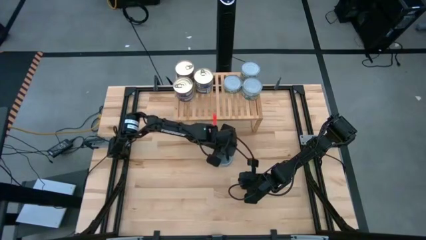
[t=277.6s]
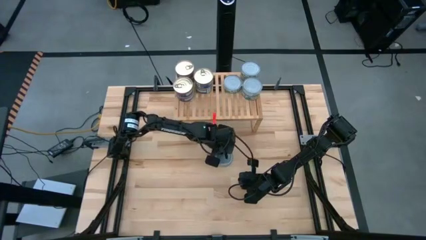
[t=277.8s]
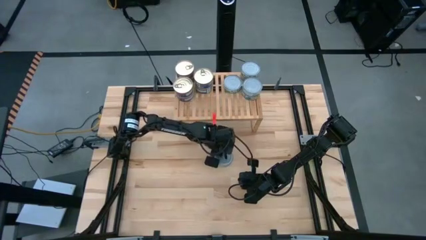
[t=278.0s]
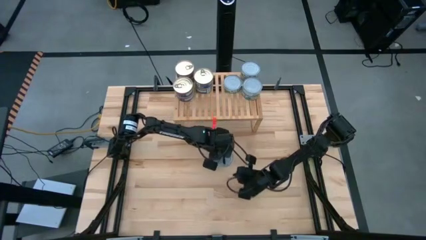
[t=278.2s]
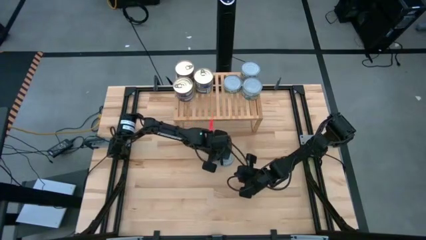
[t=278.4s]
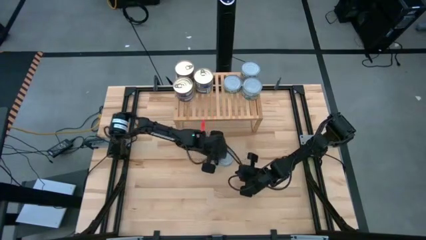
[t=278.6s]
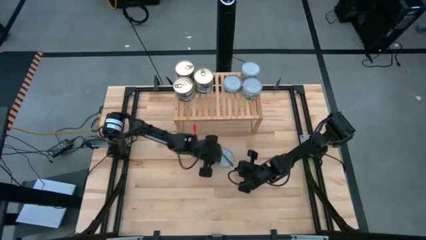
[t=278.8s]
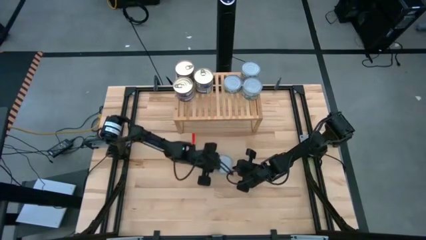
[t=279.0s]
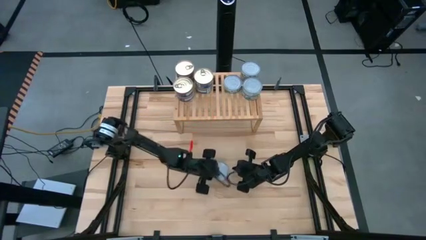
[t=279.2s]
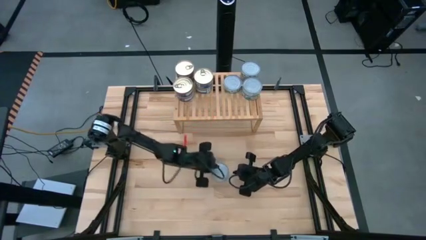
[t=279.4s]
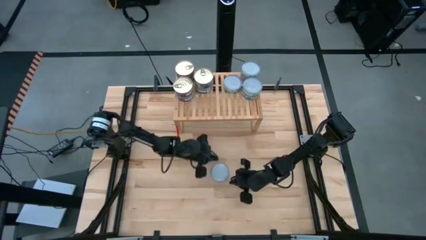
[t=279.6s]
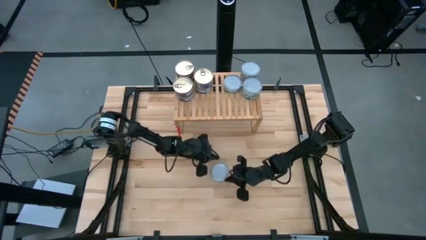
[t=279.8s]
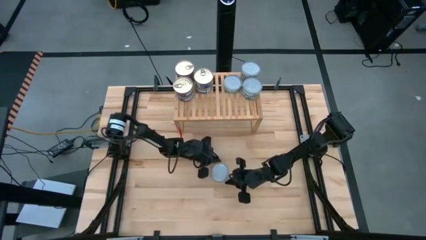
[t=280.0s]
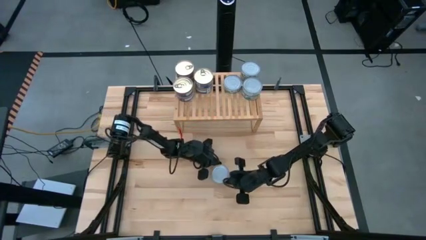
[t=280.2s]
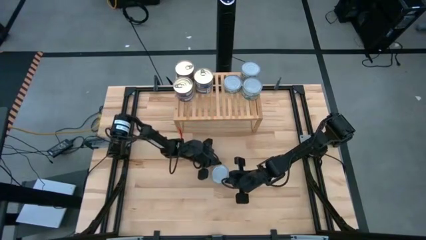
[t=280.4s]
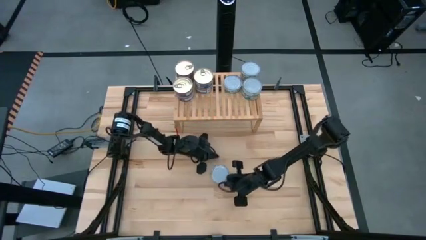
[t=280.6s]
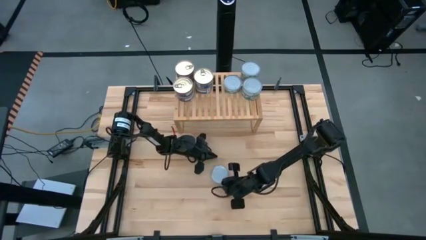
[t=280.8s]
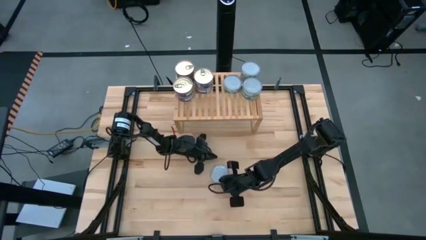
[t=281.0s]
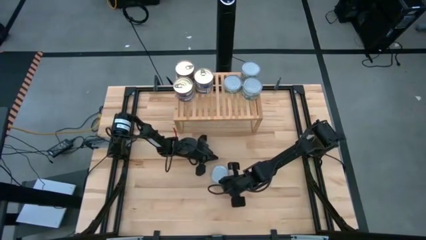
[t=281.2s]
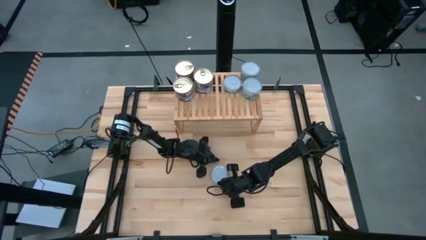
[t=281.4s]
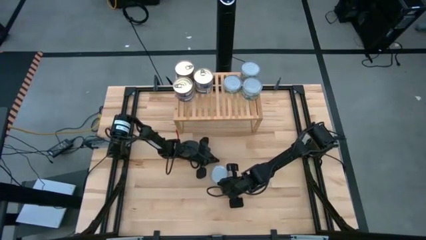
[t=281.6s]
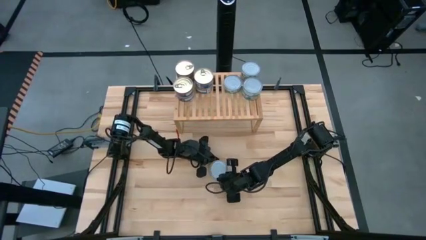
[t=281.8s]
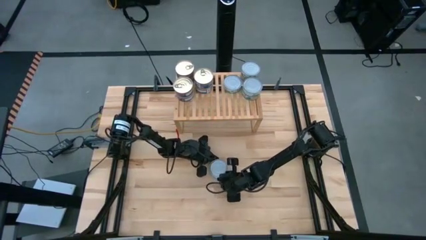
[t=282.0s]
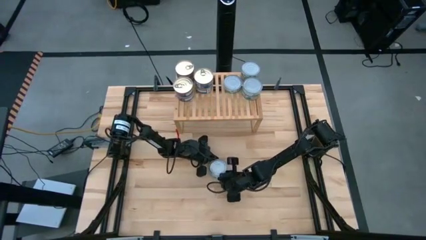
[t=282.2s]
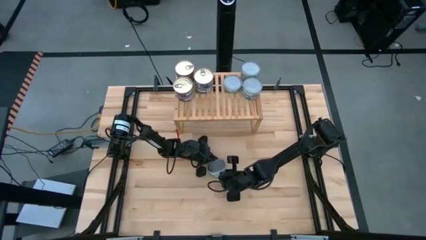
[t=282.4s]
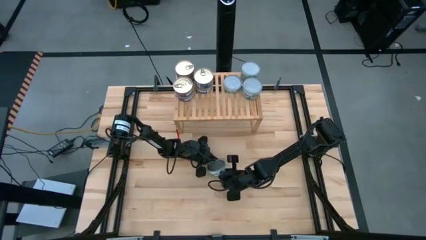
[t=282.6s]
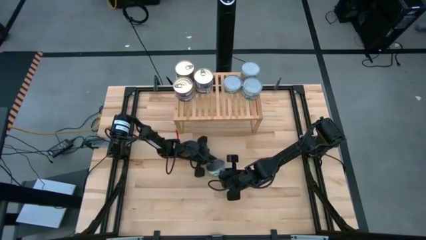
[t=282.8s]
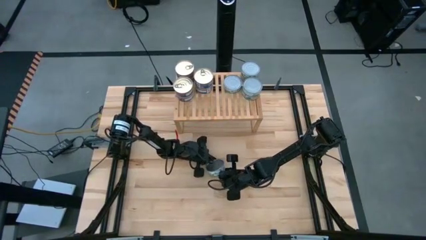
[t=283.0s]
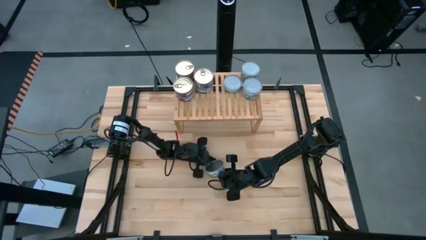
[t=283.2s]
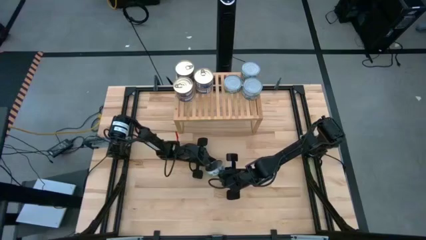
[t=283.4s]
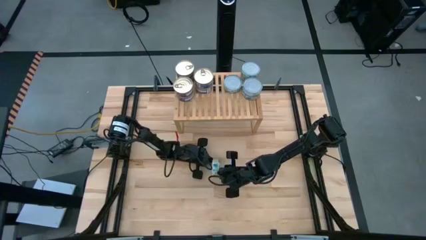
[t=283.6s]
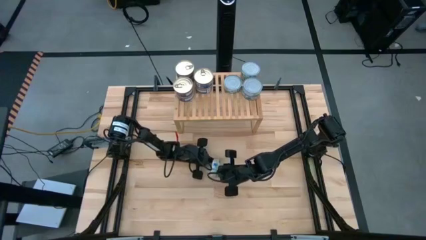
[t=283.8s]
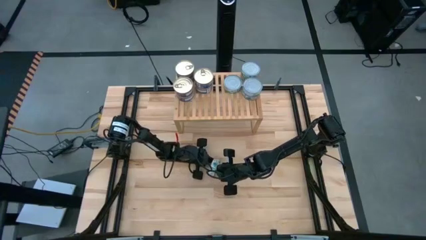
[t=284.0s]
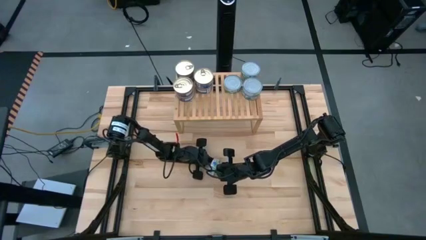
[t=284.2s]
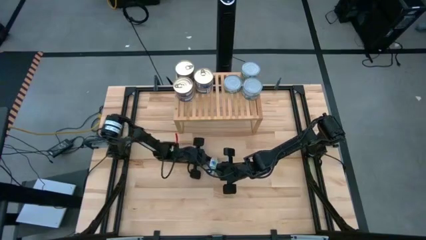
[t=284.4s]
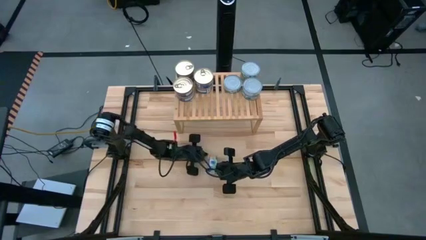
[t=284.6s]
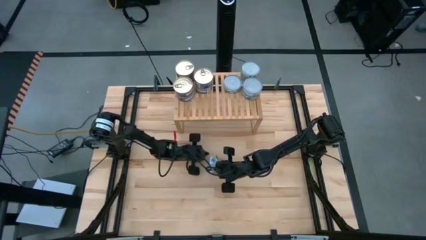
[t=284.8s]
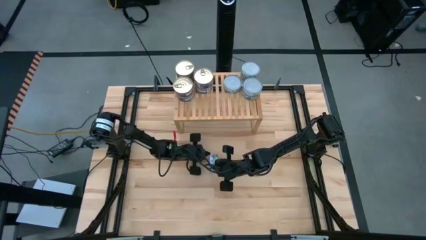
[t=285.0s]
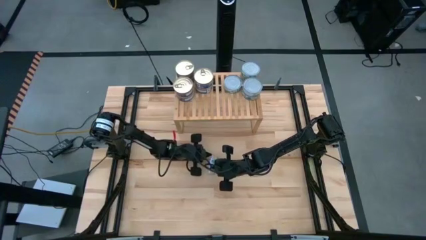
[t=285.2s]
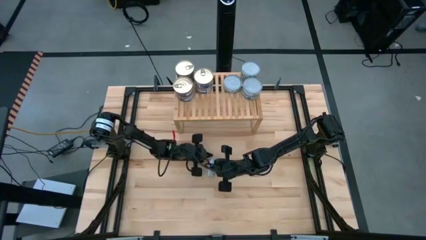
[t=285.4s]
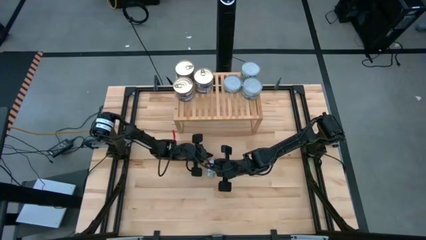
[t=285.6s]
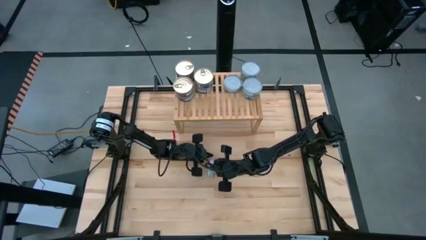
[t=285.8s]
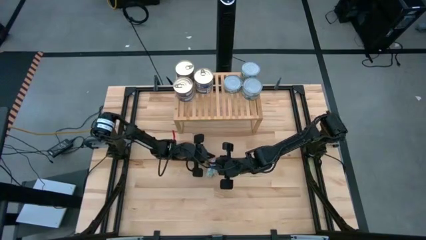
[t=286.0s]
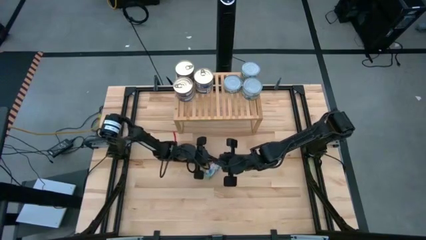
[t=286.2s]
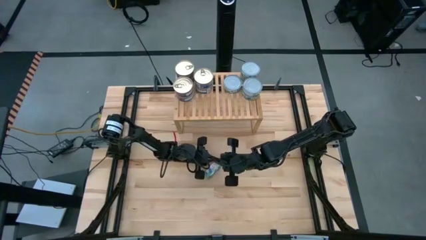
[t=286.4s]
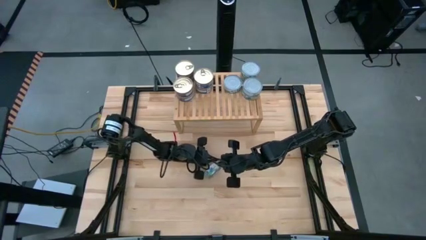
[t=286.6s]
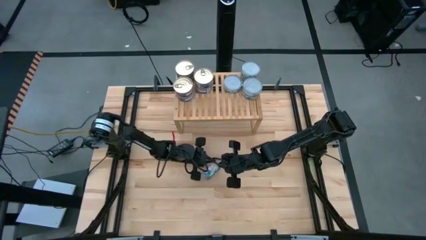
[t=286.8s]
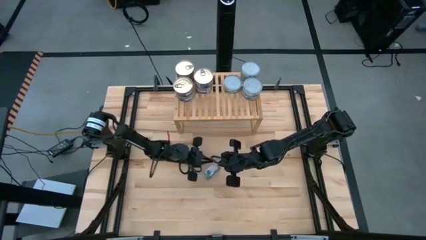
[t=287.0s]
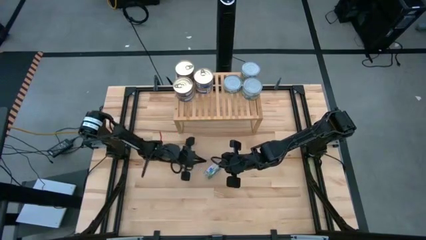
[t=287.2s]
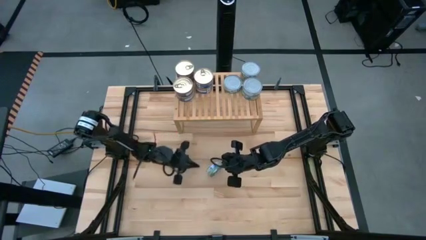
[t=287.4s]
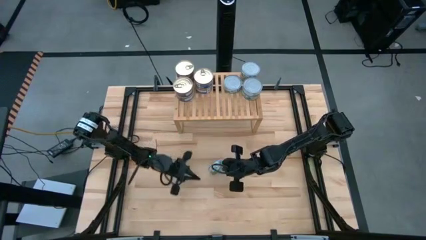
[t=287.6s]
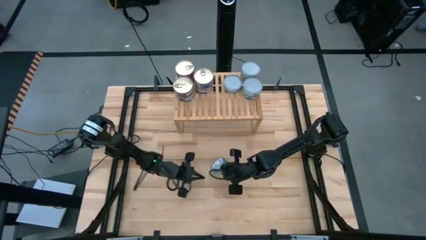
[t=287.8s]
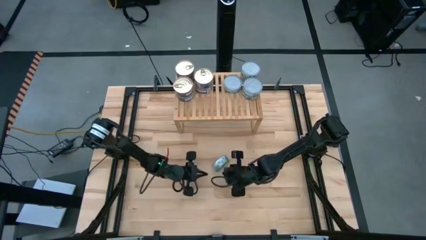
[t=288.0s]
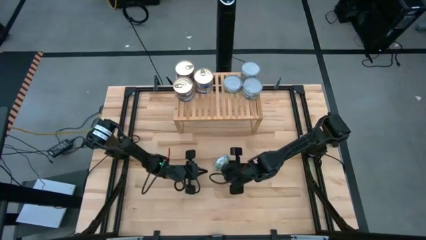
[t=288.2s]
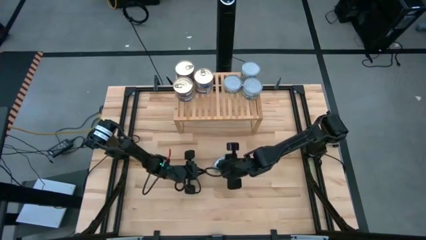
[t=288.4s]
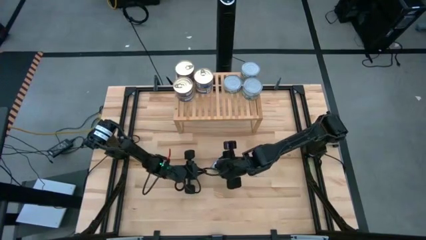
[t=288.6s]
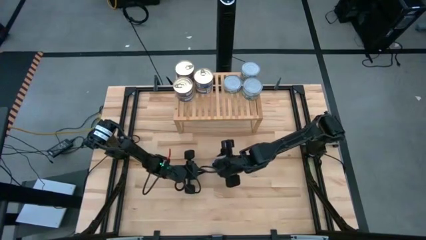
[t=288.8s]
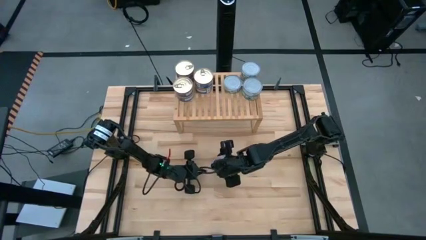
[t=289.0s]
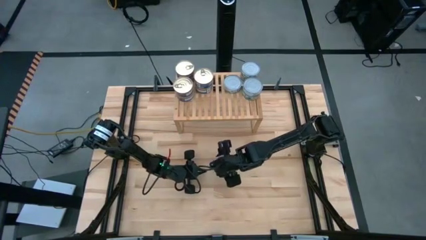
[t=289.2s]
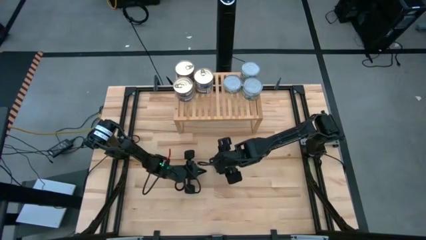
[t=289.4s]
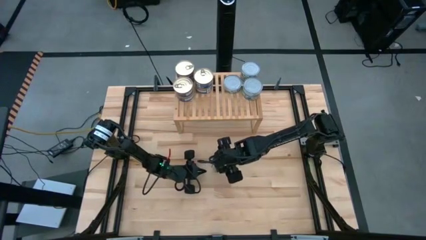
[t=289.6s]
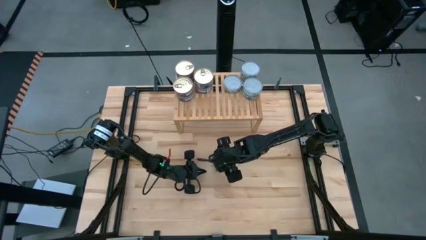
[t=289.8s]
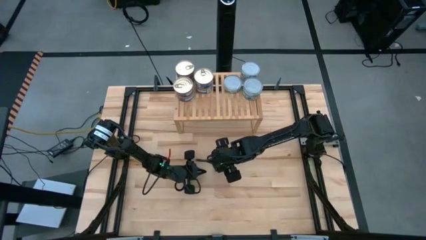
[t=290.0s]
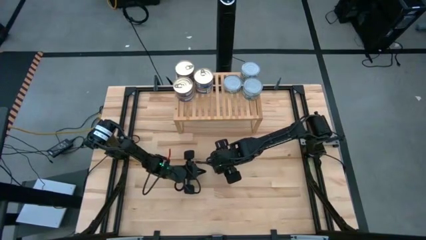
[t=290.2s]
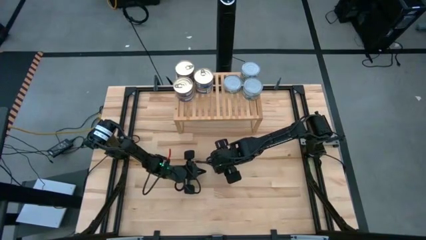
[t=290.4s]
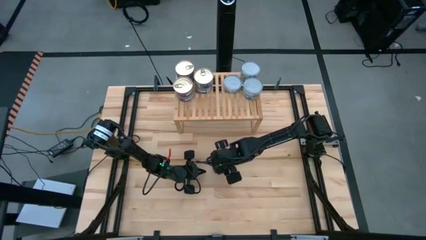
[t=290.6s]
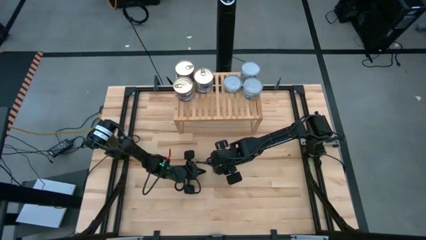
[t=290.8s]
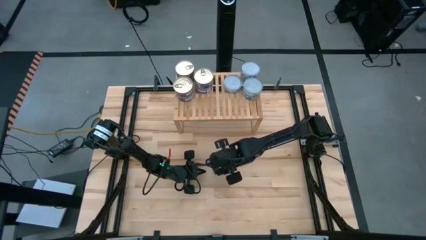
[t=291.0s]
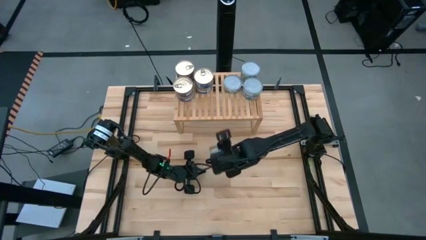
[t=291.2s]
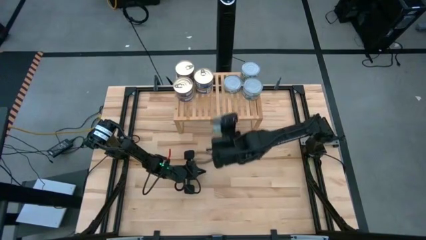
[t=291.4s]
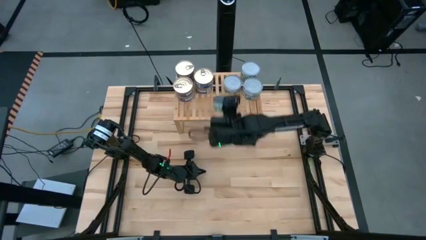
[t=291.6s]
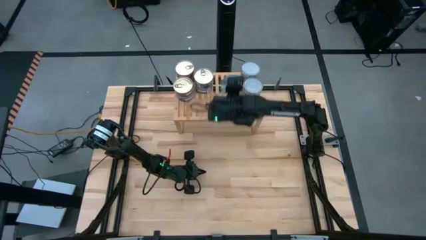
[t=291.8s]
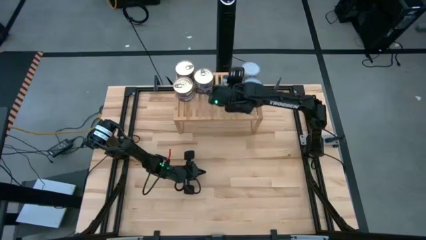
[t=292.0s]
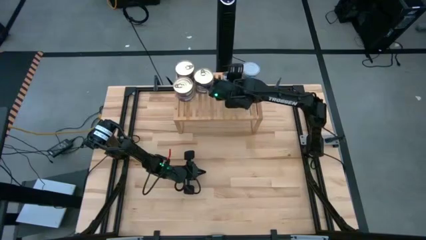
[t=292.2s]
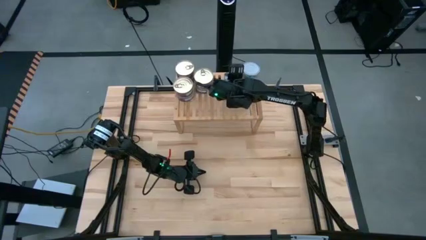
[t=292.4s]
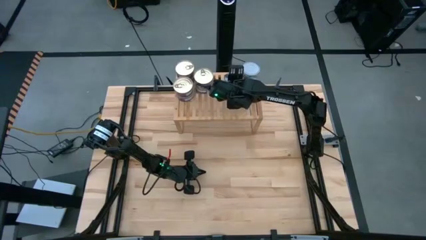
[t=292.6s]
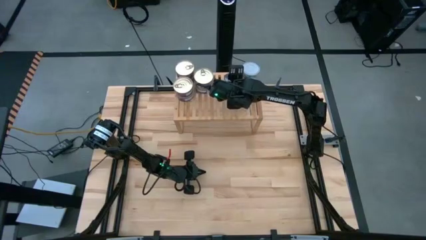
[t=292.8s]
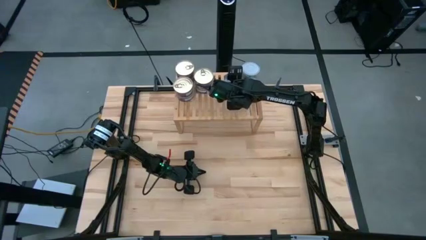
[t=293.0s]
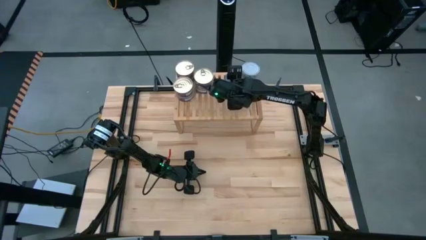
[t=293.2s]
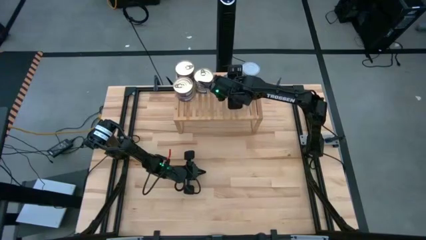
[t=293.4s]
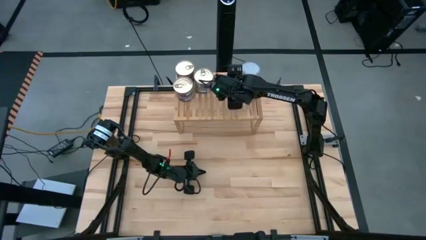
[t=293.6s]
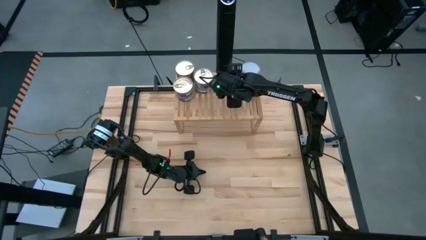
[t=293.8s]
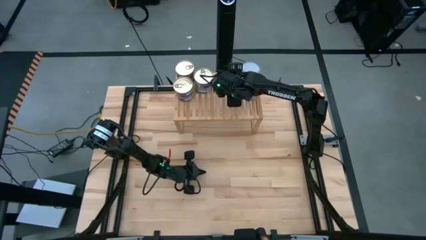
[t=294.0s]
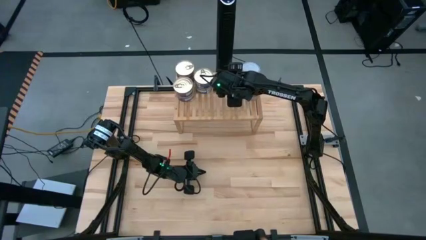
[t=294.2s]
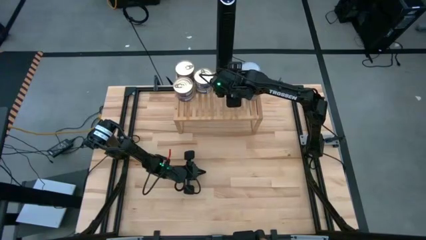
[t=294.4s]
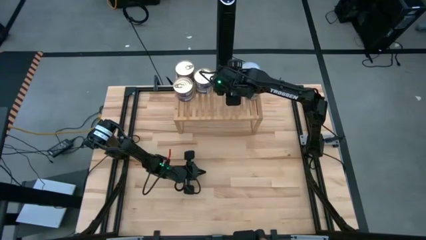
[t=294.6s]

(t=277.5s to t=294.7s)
Task: Stack canned seafood by type on shelf
Stack the green tuna can on top of the other green tuna can on the shelf
